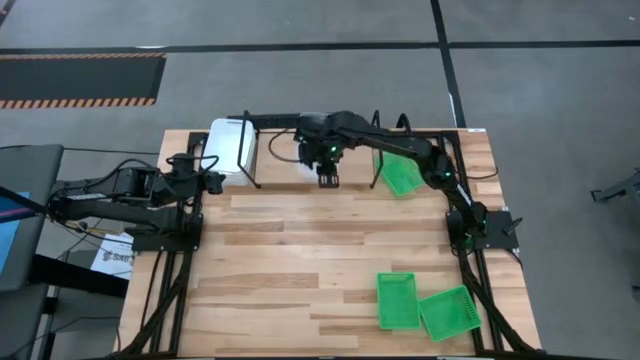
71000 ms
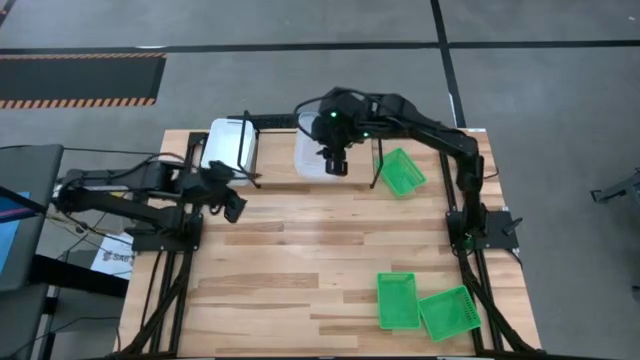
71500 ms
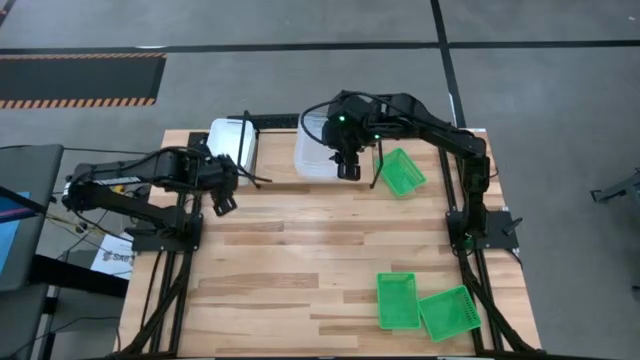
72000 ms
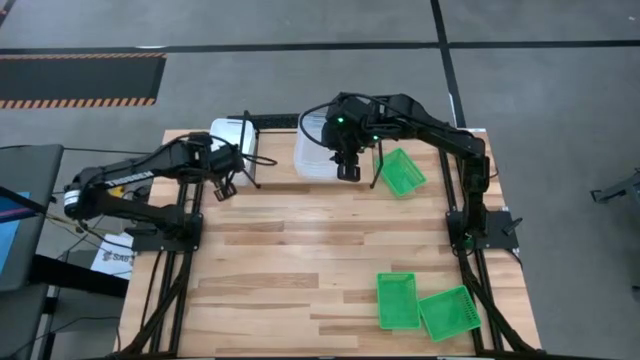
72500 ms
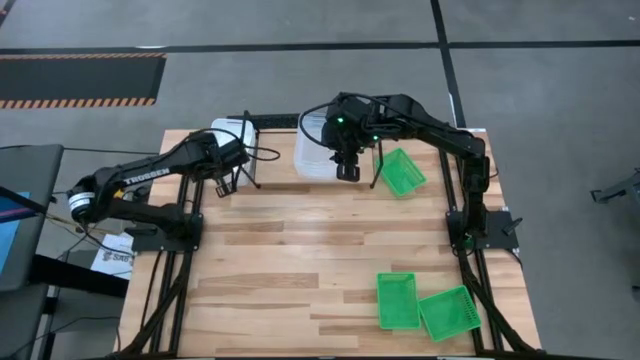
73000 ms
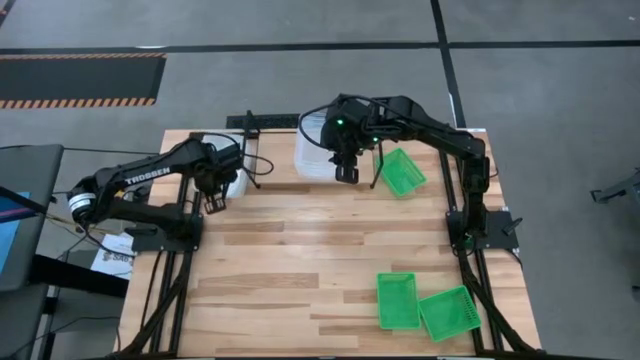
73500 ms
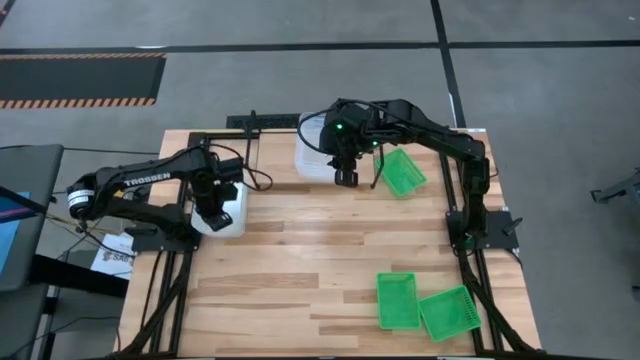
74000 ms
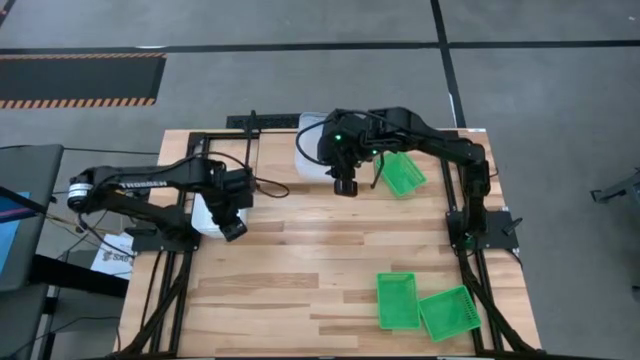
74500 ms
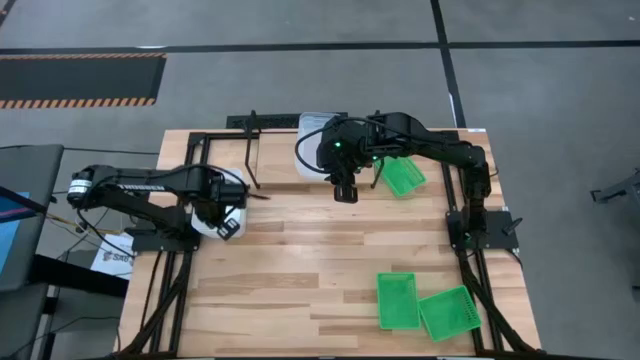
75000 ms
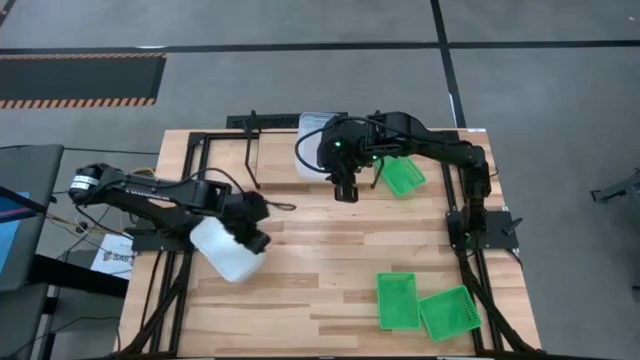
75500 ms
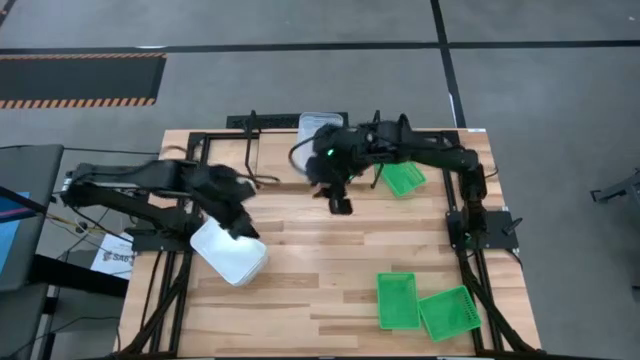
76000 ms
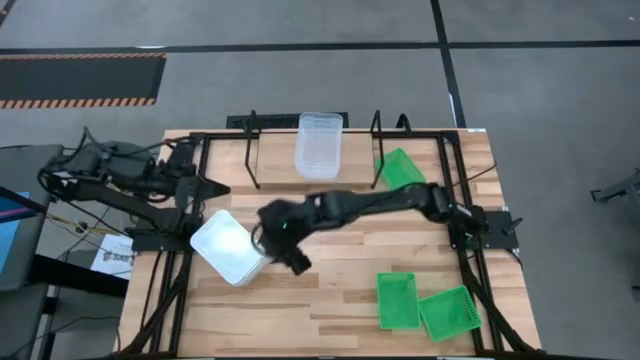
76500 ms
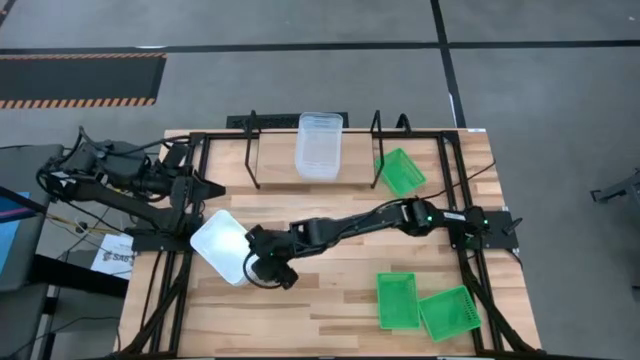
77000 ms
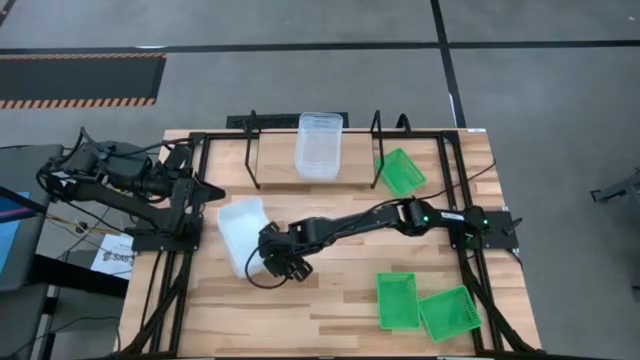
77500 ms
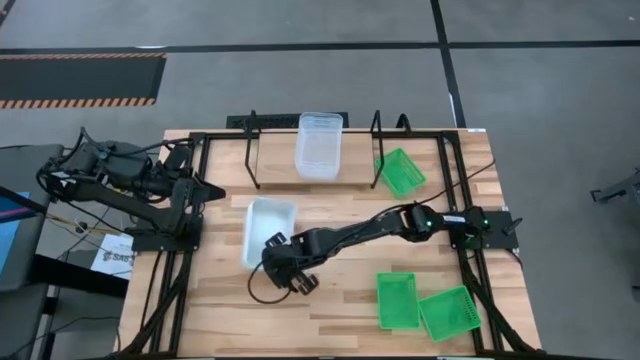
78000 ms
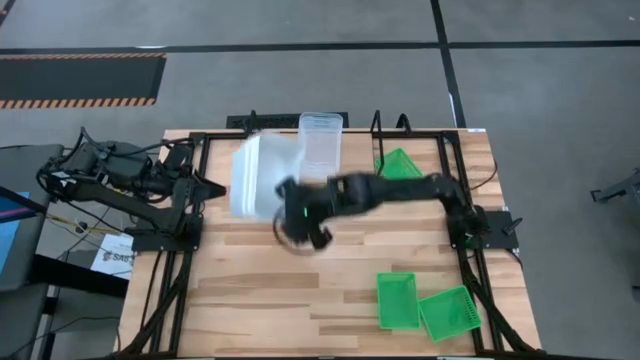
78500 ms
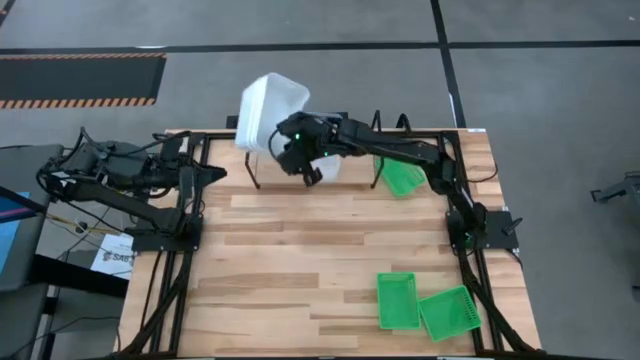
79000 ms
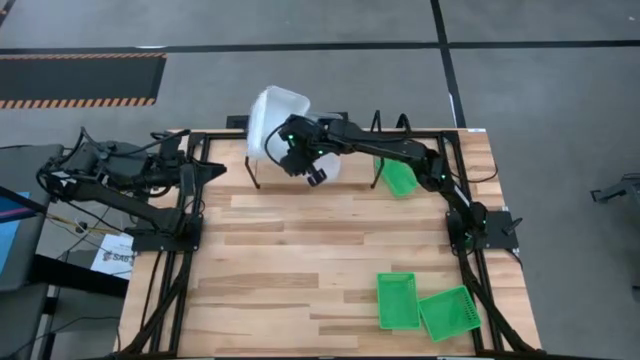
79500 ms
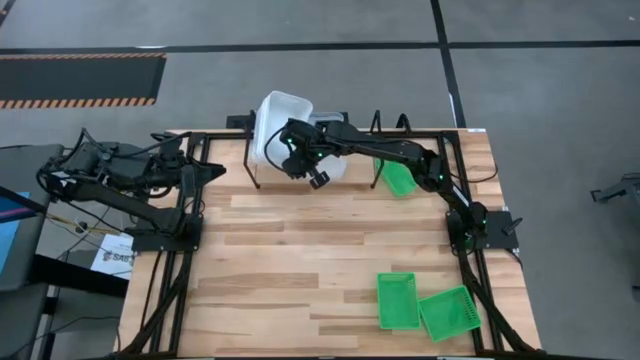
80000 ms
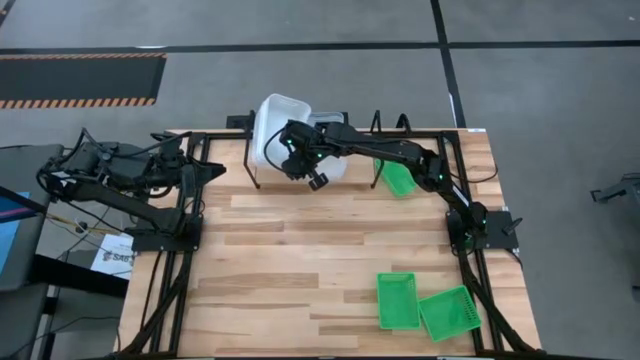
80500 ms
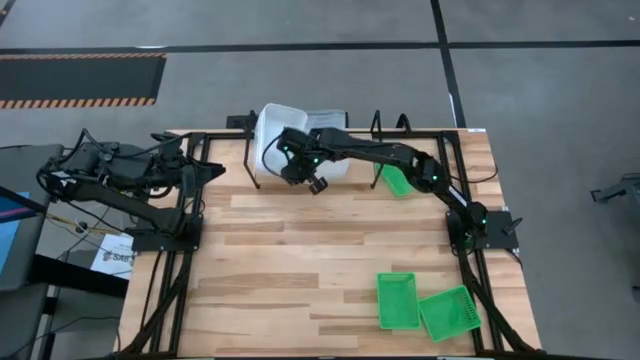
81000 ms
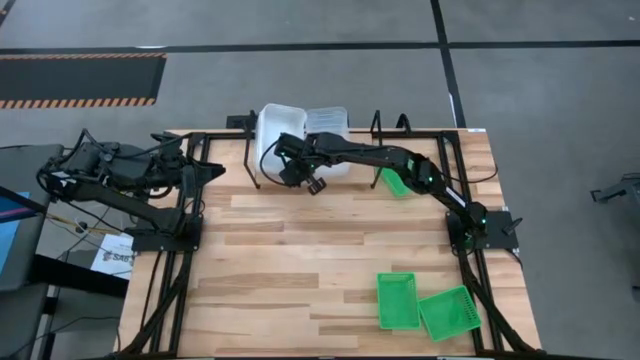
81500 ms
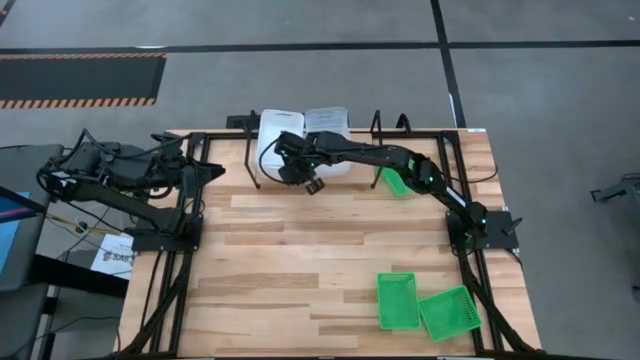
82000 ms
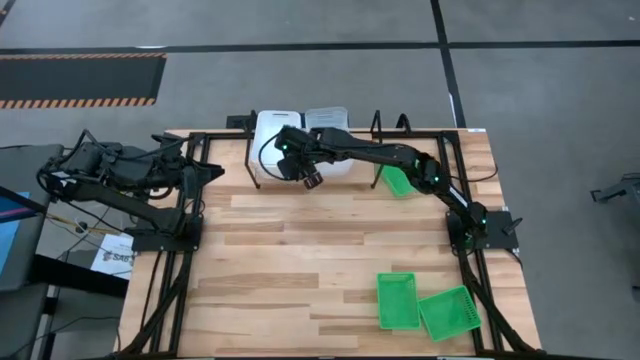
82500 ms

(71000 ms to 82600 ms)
Task: Stack baskets on shelf by color
Put the stacked white bins on the shelf

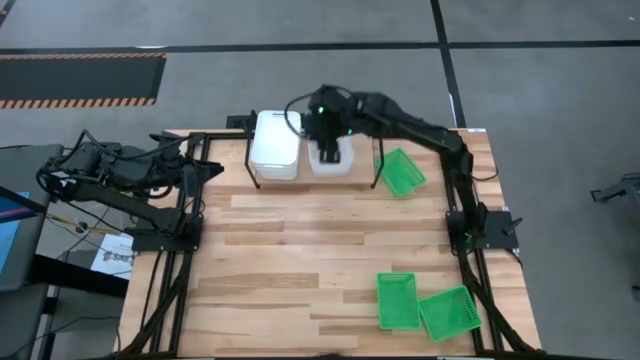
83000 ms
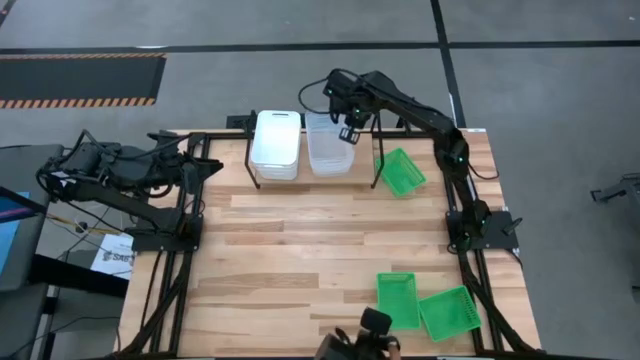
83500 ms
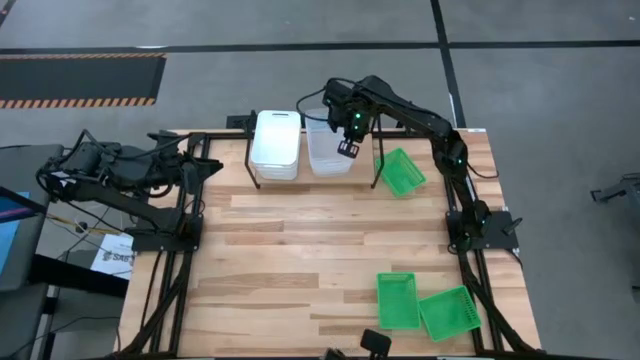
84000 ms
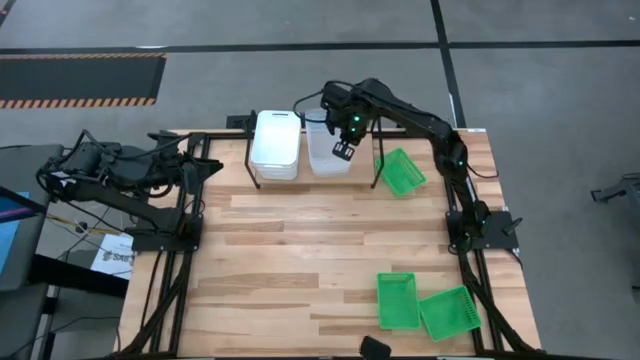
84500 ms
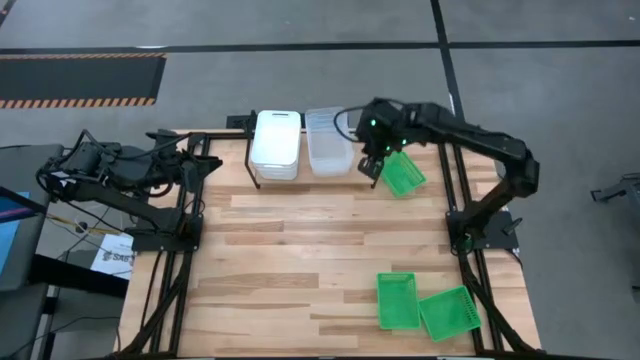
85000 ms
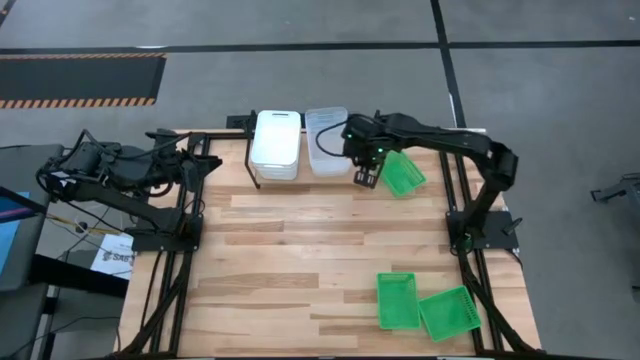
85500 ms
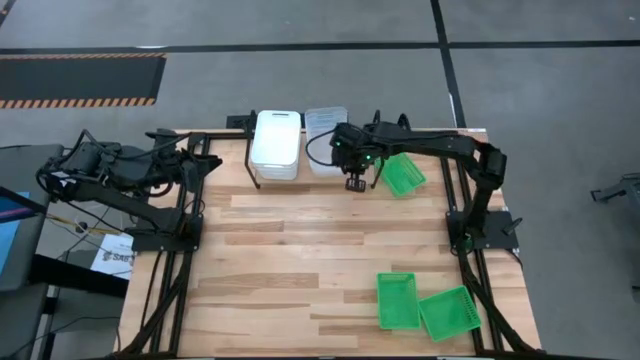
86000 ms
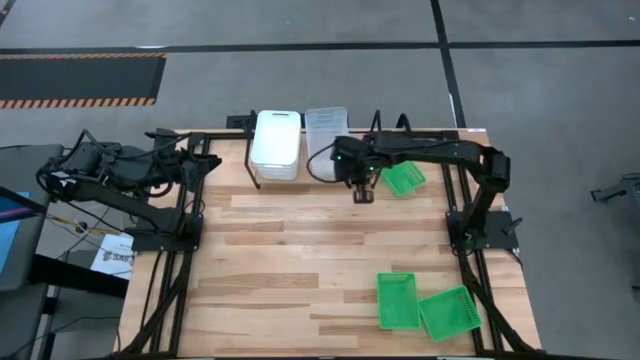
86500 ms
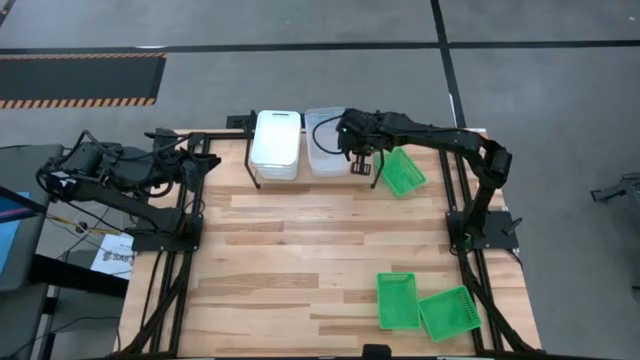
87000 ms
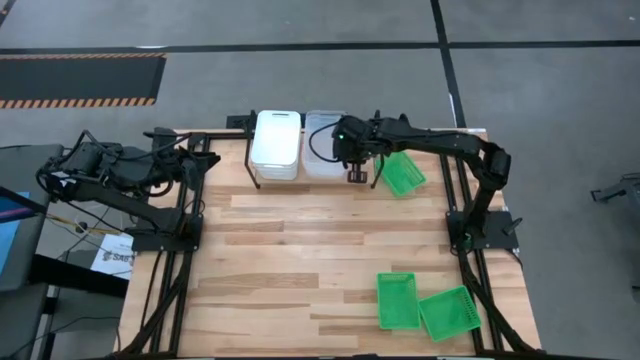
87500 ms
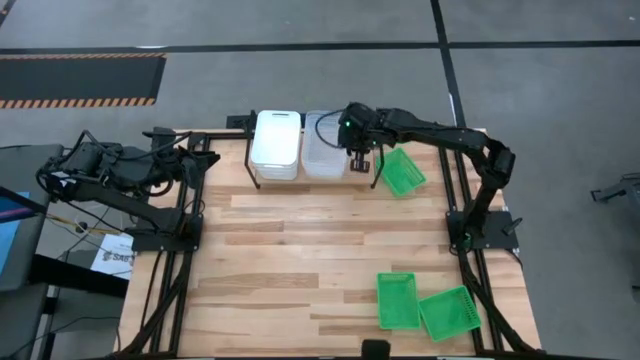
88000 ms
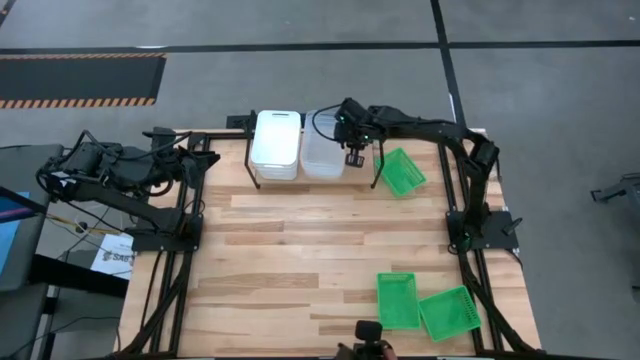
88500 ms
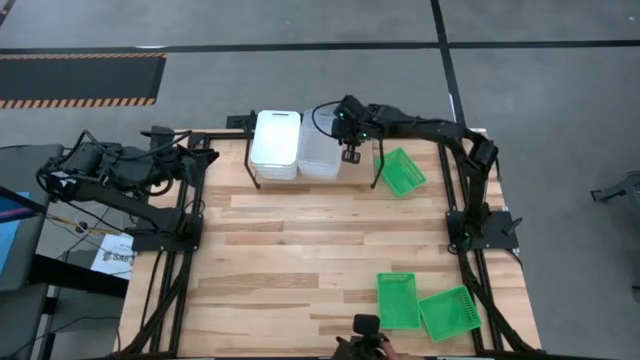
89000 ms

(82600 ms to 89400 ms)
Adjust the stacked transparent bins on the shelf

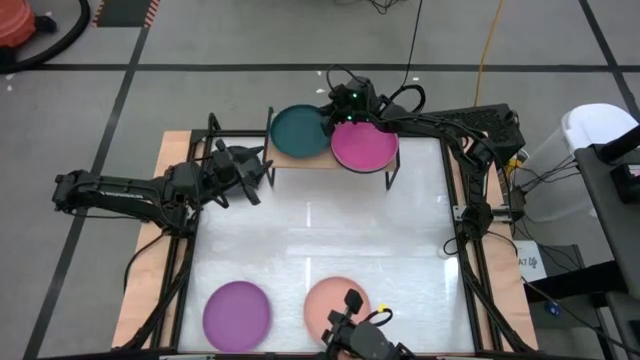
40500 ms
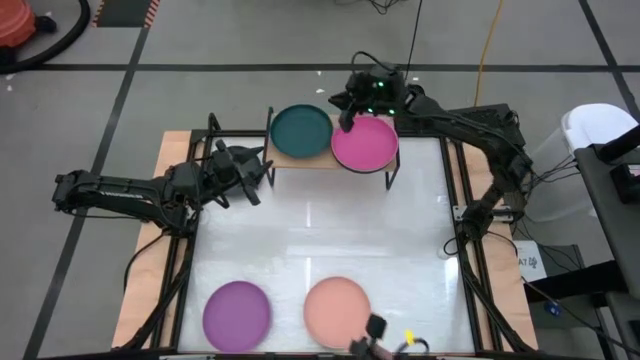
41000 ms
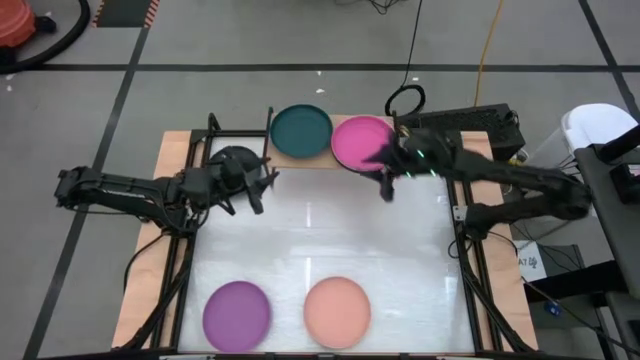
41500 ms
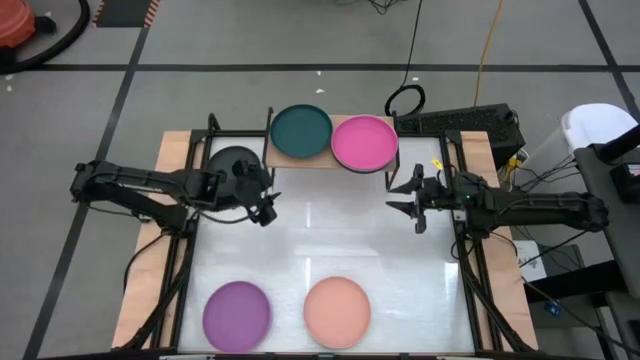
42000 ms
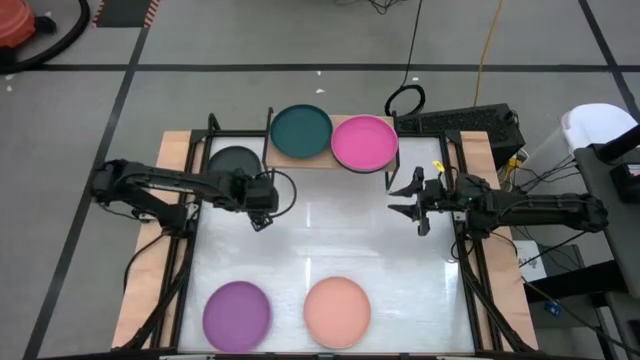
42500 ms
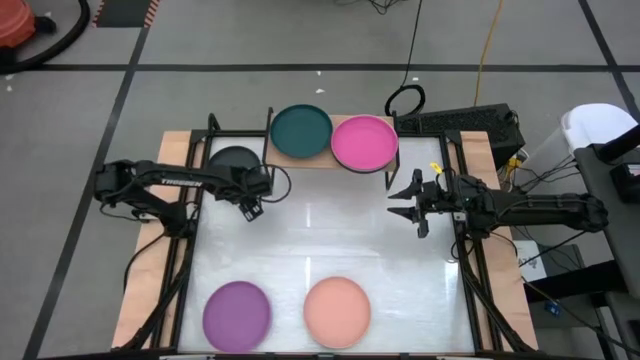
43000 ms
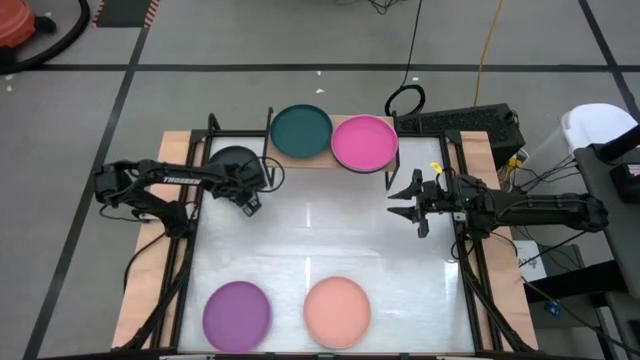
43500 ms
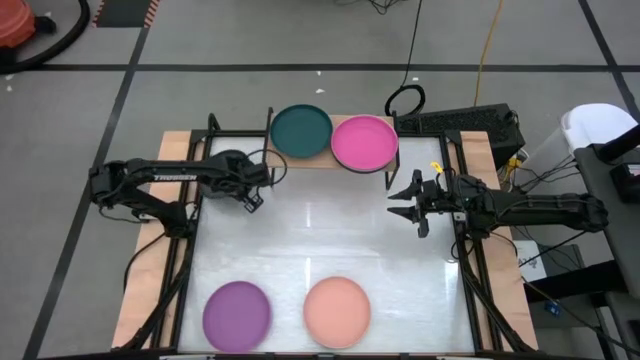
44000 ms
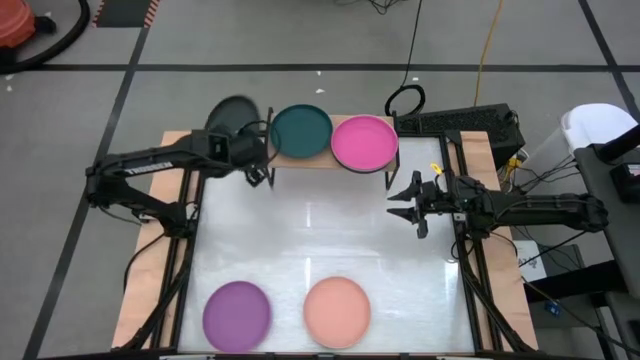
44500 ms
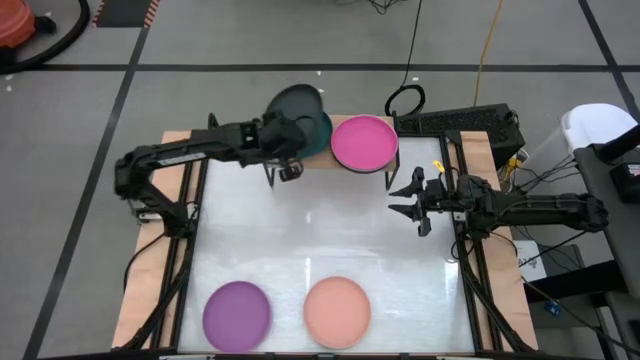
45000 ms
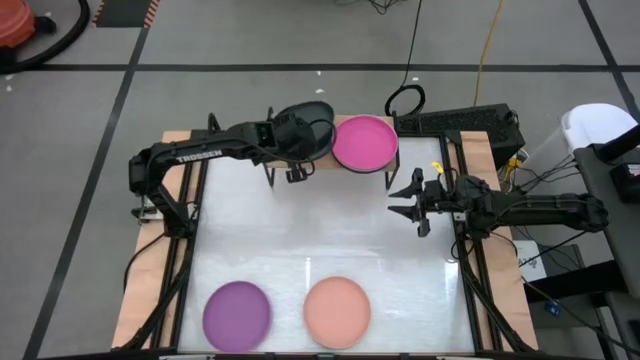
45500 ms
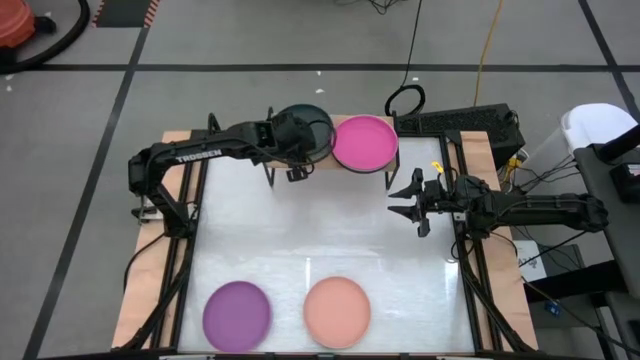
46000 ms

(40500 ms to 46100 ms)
Task: Place and stack plates onto a shelf
Stack the black plate on top of the dark green plate on the shelf
